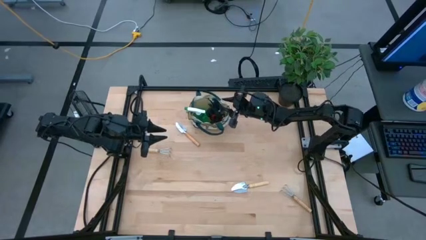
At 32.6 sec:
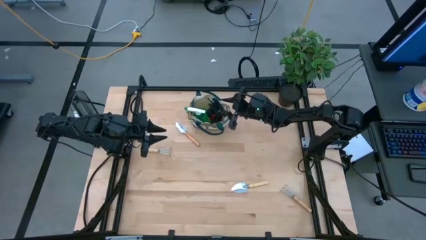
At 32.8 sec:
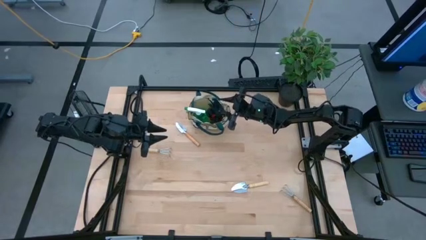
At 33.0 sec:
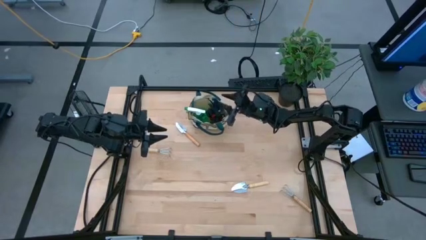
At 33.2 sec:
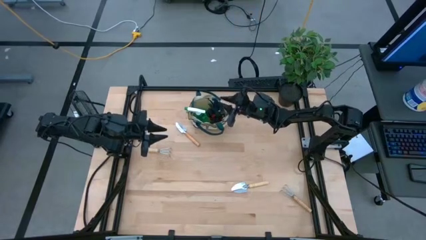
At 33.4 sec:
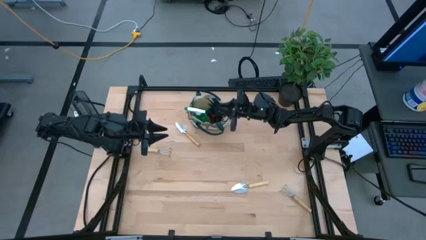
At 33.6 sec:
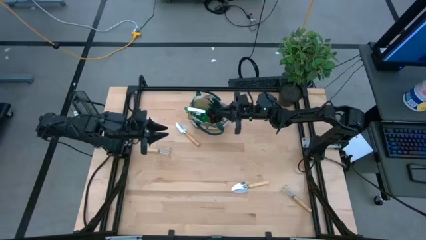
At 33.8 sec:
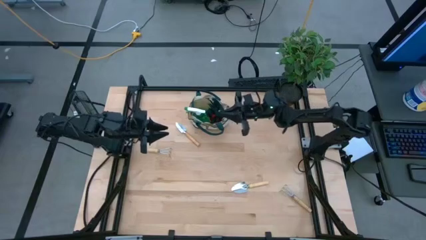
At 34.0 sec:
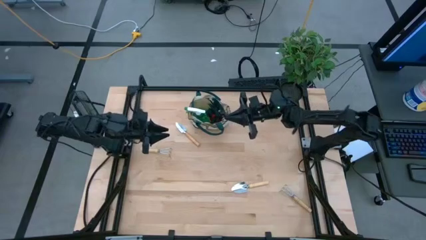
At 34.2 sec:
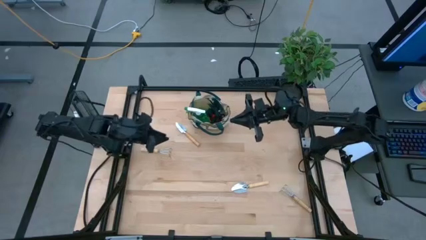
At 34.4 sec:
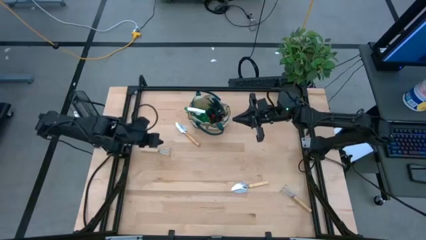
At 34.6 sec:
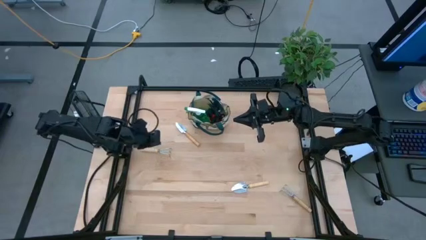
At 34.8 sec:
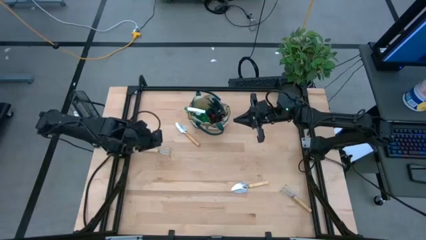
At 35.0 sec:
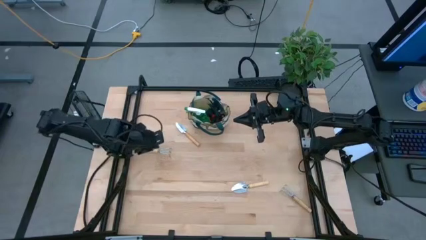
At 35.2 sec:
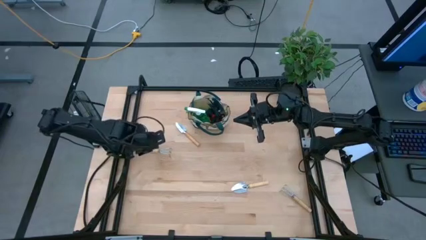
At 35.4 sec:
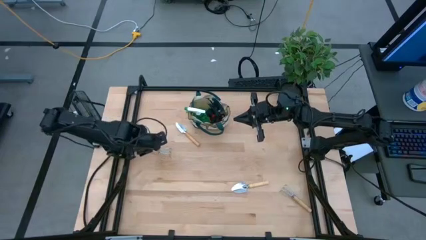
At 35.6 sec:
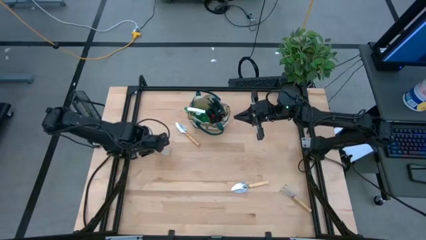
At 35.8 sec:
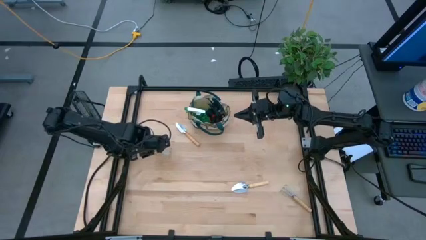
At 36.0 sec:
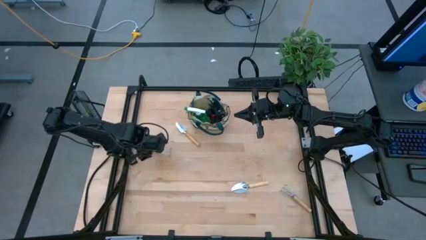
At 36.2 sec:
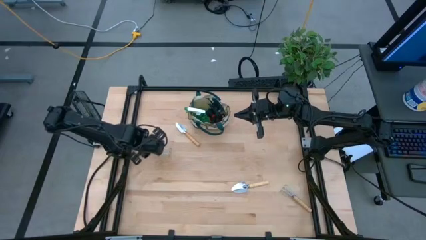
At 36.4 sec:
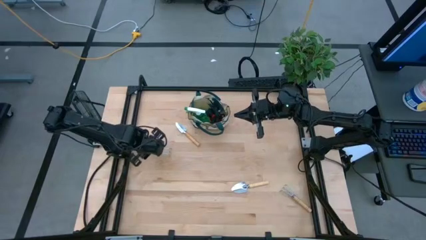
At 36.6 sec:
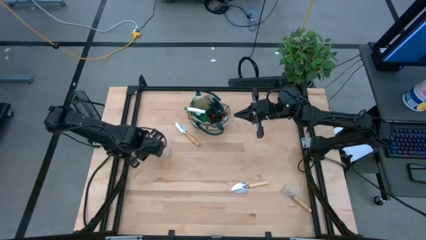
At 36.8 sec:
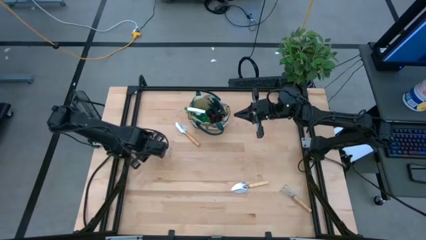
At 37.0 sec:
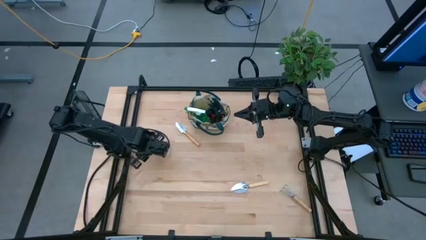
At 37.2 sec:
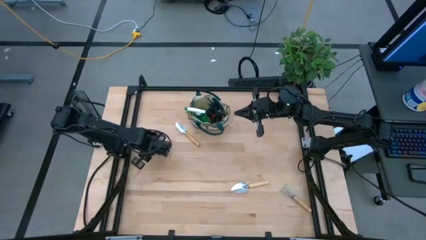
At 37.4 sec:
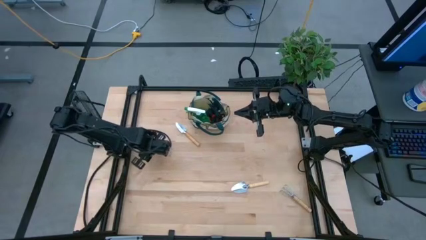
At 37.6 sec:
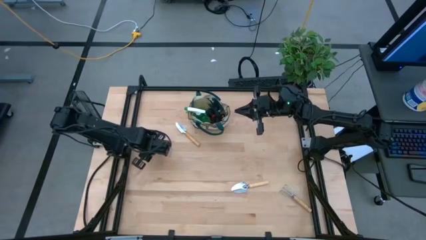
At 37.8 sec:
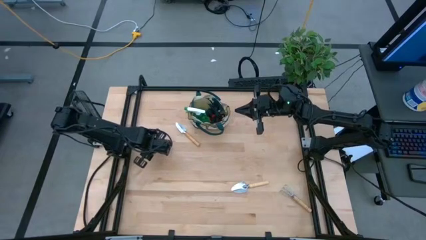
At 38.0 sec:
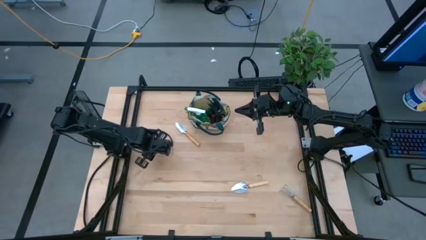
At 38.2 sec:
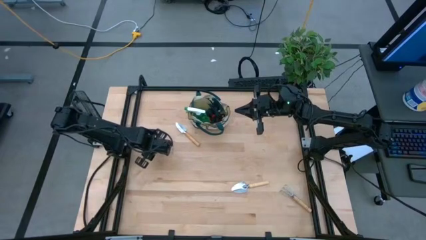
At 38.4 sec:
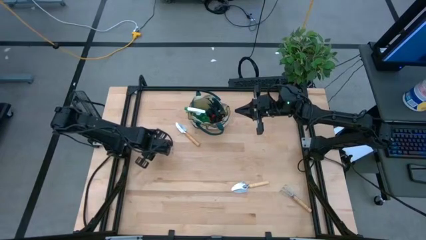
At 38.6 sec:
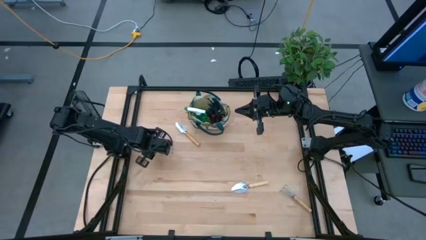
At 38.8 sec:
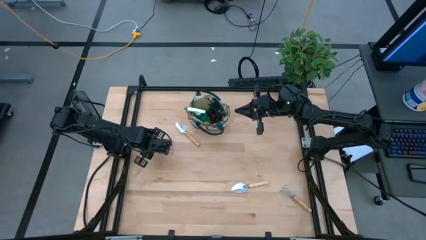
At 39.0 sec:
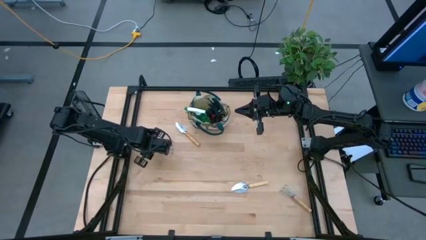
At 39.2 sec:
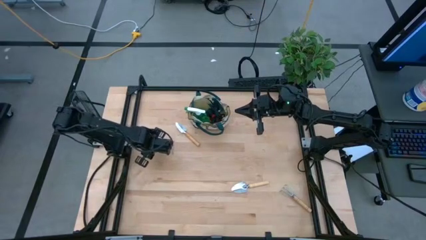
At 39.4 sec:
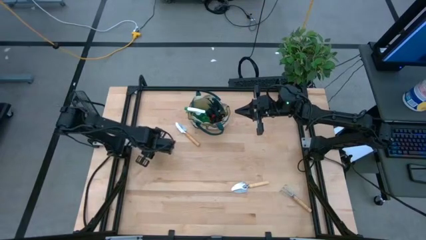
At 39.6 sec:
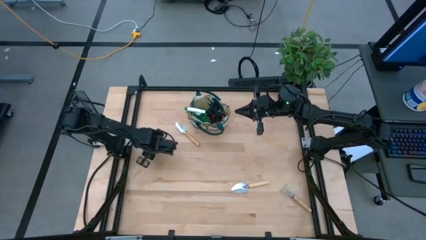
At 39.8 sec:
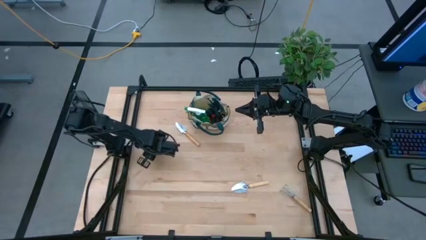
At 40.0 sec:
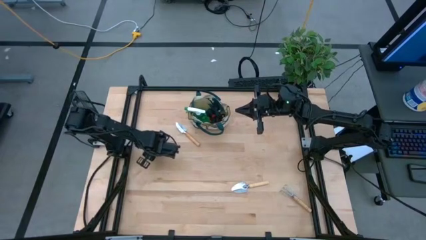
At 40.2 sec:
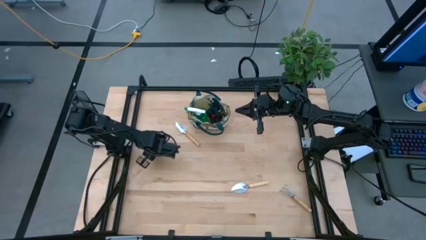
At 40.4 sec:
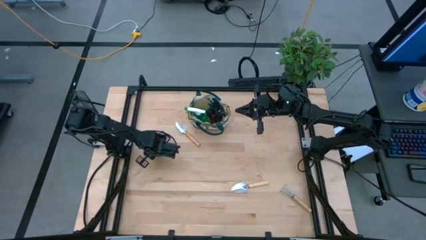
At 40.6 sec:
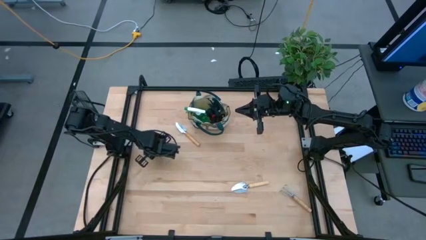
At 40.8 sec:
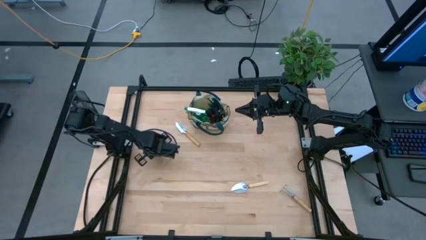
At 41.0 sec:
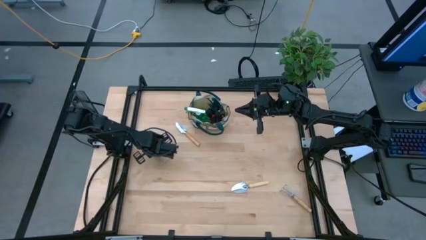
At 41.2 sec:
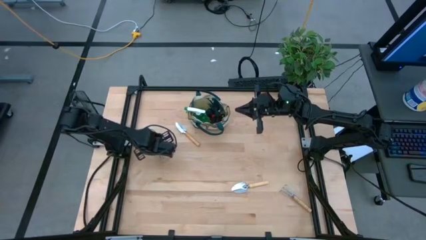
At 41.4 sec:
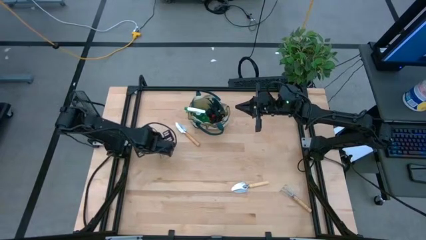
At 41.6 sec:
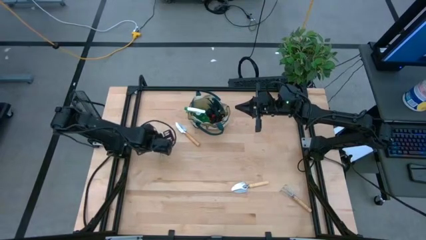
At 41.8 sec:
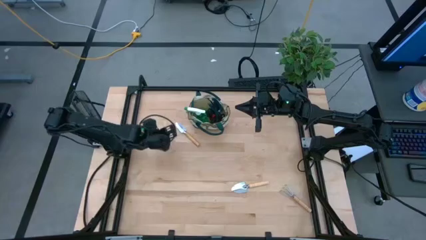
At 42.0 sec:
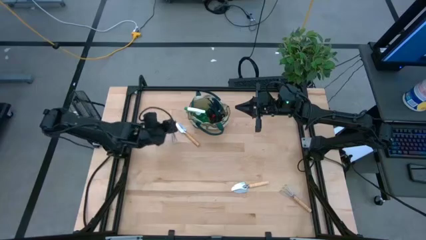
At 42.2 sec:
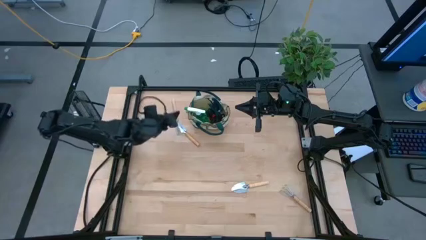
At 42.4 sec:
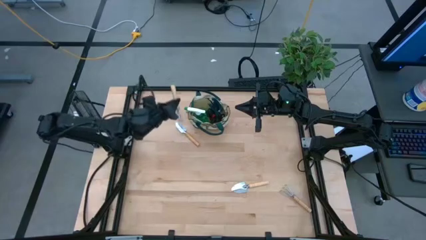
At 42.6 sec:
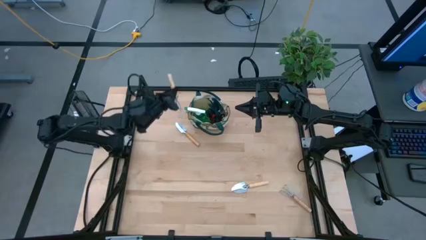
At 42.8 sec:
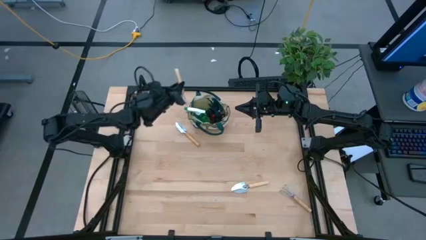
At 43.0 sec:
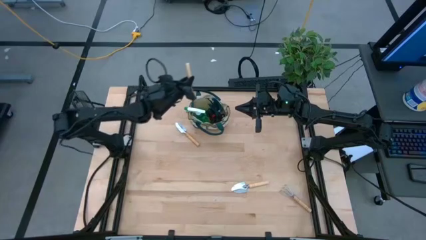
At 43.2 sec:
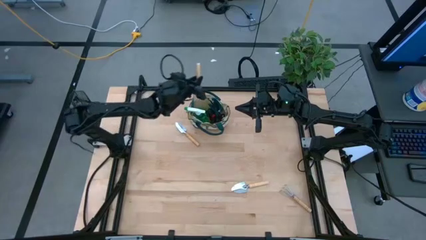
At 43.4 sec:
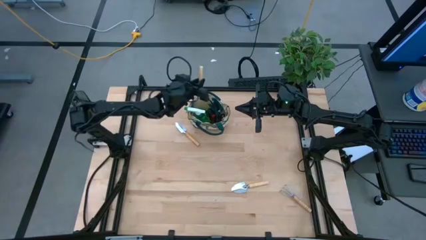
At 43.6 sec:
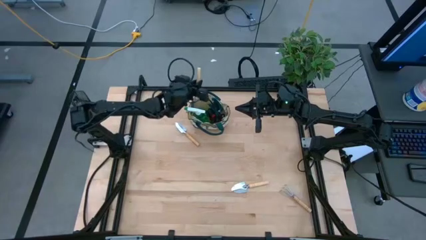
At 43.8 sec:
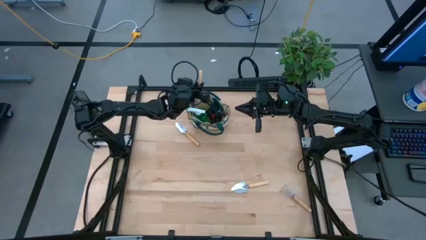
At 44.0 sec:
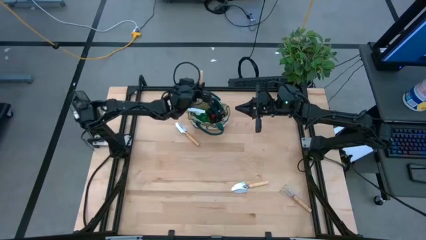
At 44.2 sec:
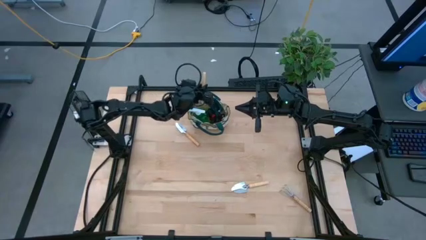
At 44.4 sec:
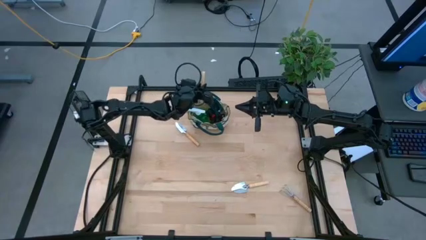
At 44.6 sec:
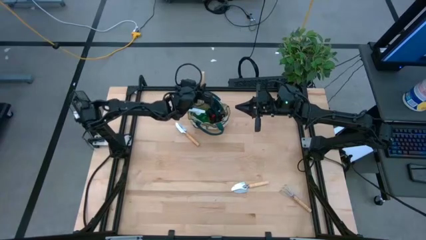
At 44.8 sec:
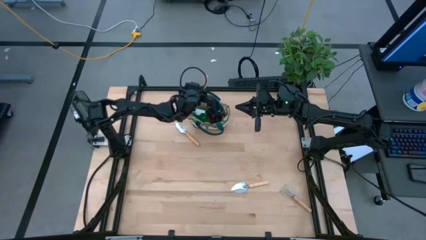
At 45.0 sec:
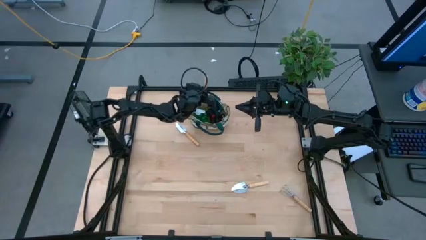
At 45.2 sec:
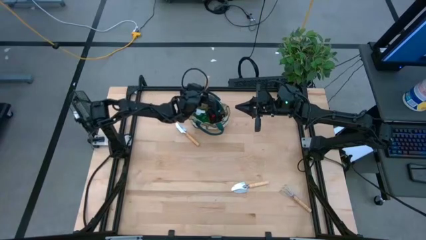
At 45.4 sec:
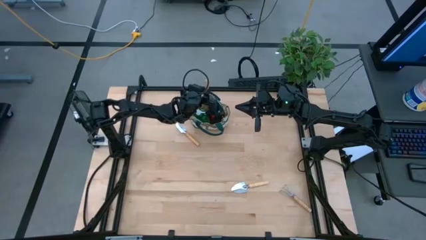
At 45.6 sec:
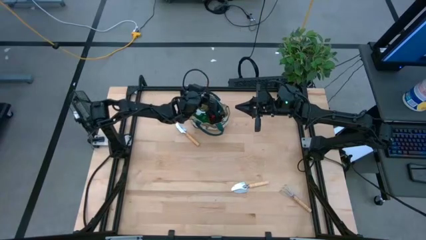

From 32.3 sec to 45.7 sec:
Task: Pick & Place Garden tools in Gardening bag
Put the brown hand rake into the gardening bag
